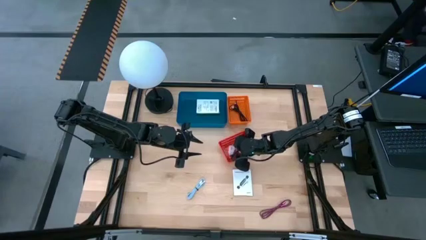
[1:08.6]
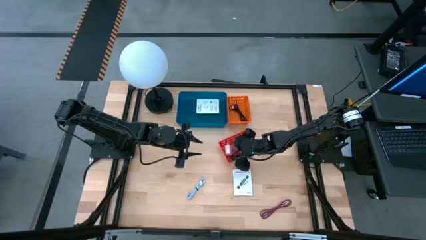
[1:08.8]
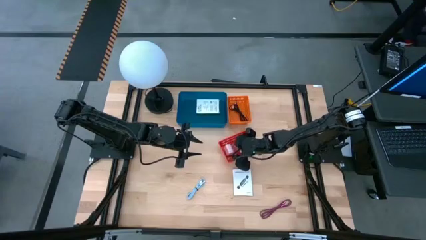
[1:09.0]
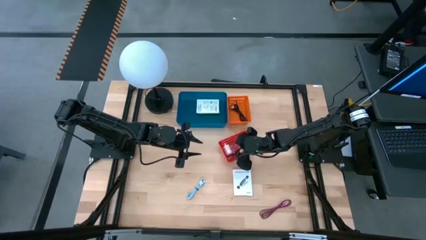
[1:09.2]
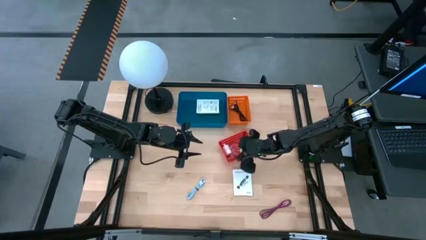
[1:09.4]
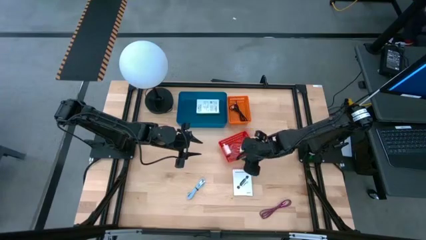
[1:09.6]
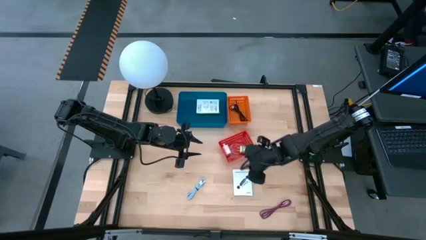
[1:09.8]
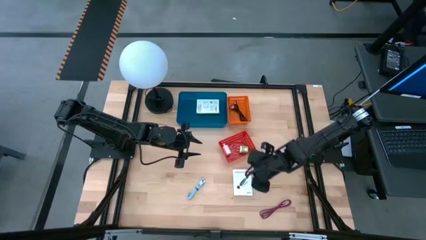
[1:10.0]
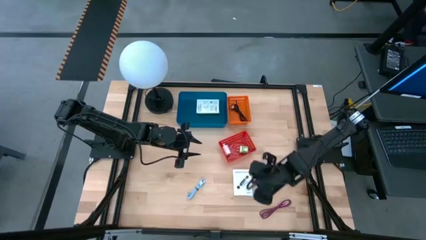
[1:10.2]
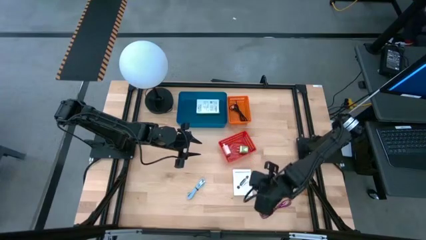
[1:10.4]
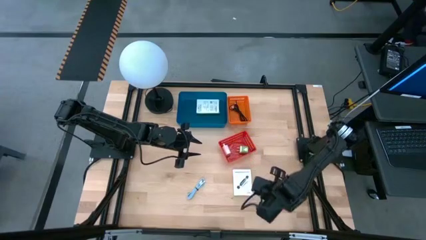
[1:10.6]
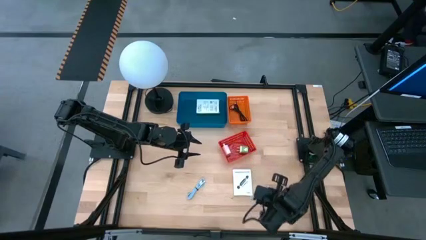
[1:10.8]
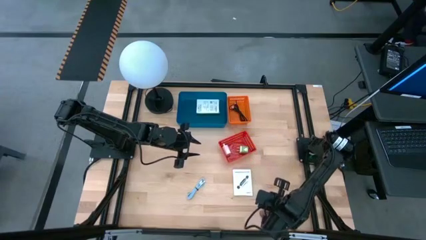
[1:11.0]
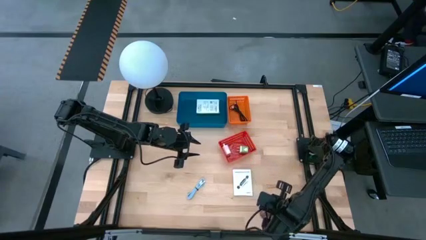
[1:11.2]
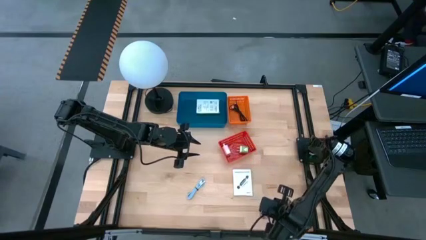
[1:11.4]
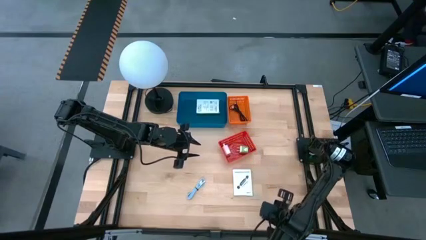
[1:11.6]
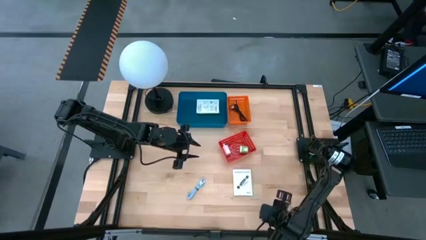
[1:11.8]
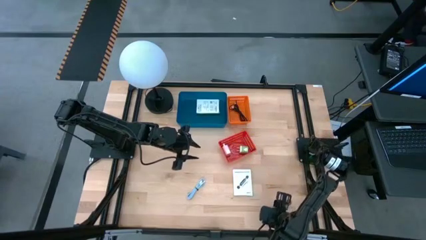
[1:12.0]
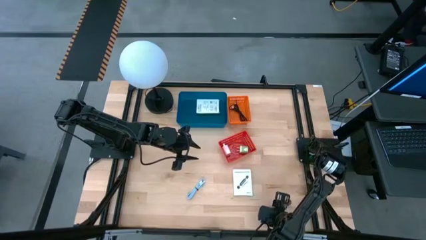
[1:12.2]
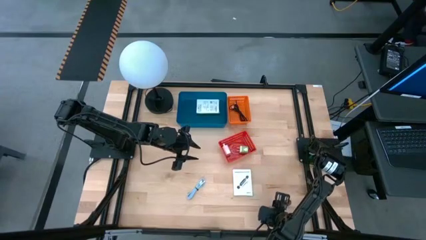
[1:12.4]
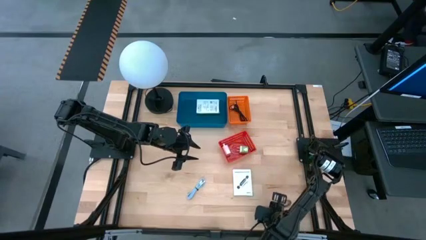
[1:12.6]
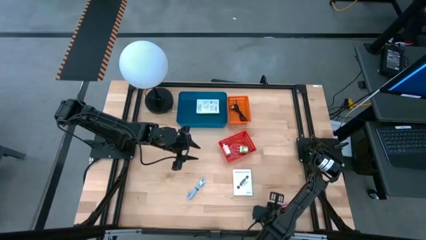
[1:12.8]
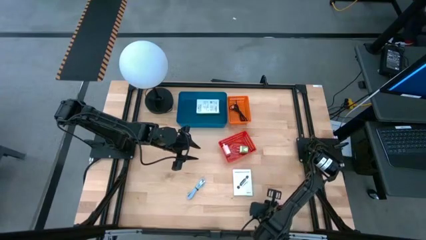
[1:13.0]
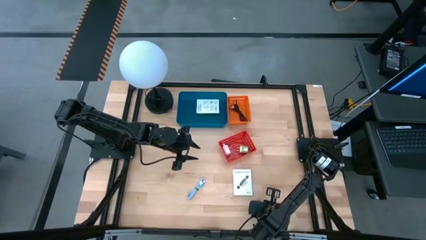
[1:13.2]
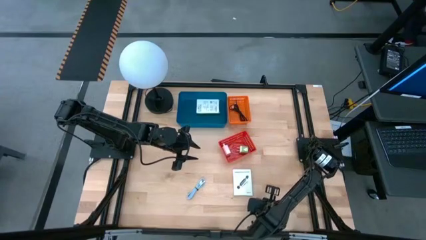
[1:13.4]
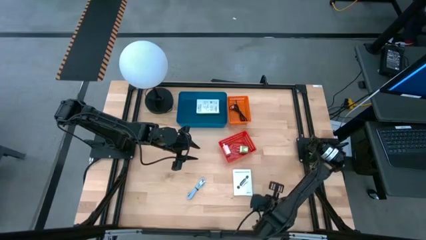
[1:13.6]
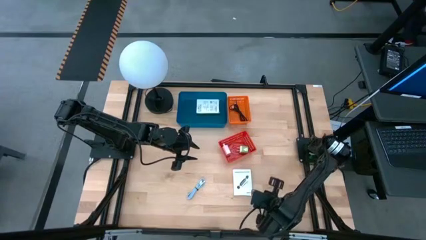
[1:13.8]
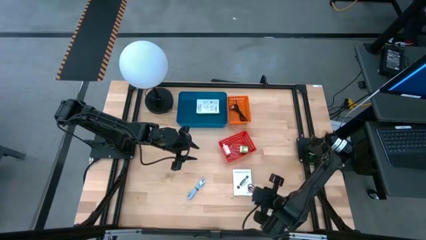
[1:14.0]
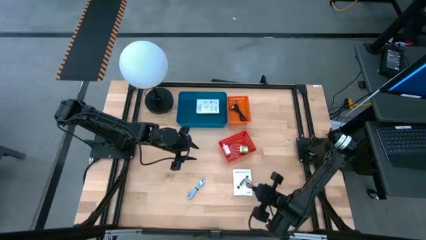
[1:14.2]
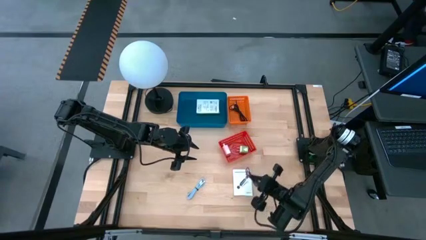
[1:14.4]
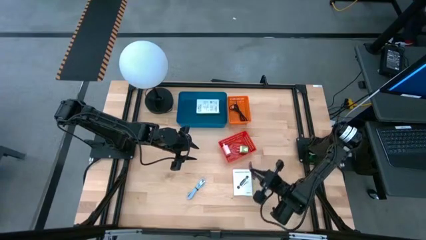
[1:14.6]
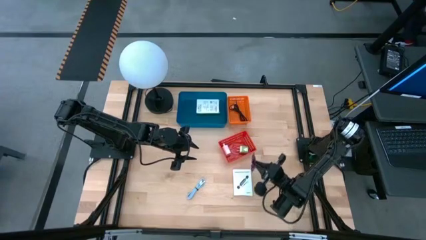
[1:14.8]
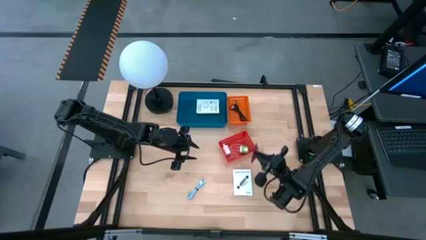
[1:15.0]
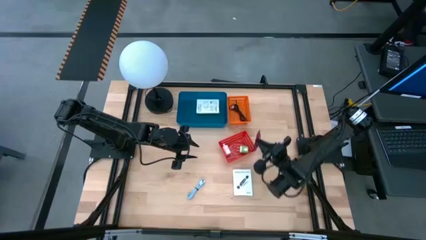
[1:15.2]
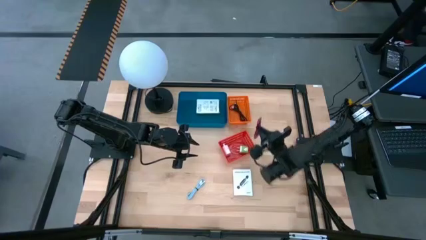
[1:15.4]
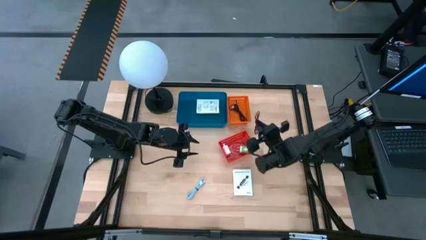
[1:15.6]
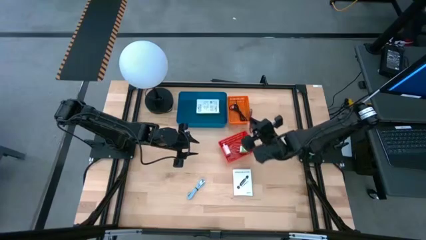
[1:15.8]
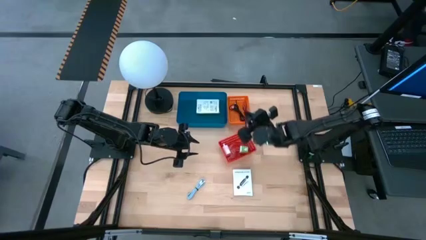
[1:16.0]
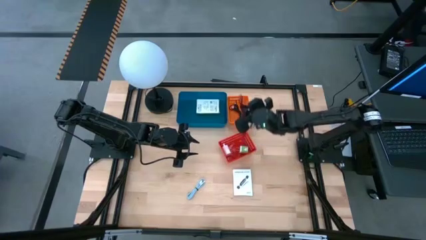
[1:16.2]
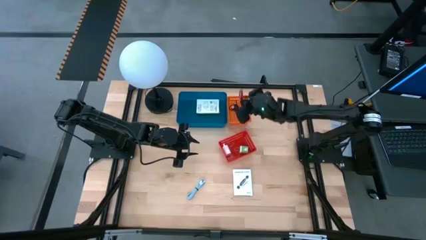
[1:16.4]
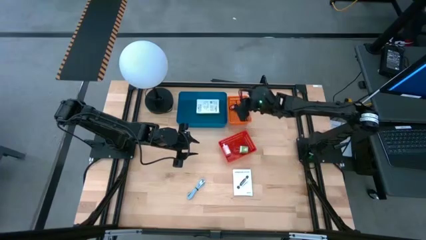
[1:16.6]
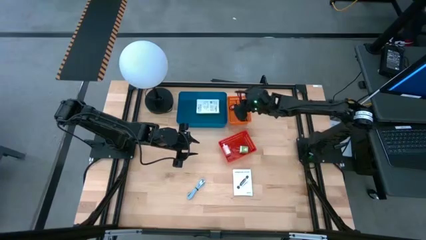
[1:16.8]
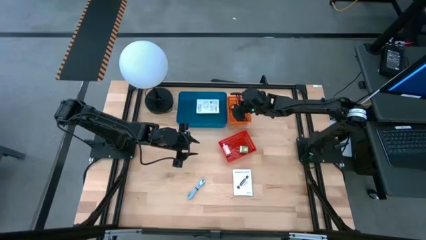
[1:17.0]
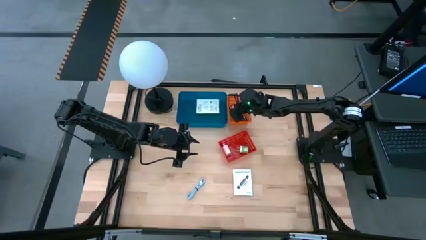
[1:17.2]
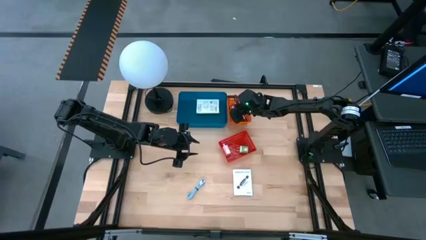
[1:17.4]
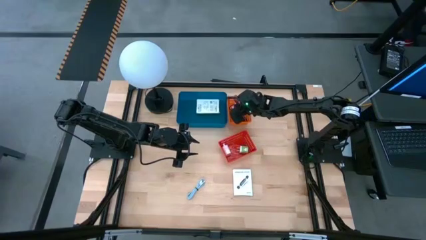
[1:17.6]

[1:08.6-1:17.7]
Task: Pick and place items into bin
Put the pink charger cable into the orange bin

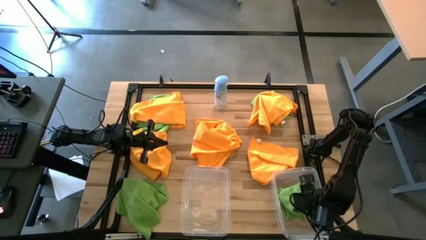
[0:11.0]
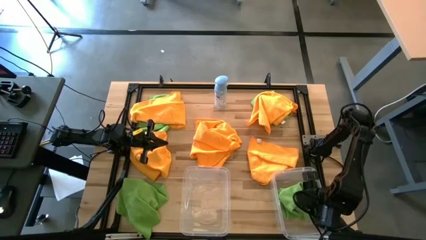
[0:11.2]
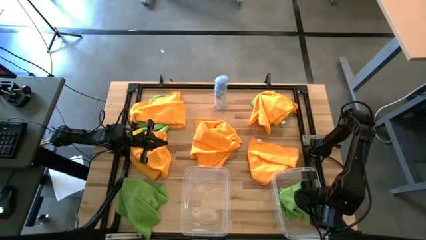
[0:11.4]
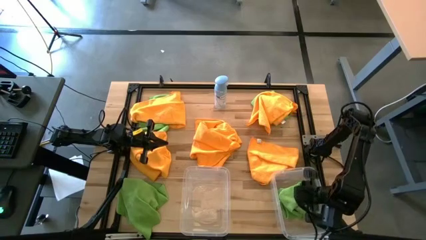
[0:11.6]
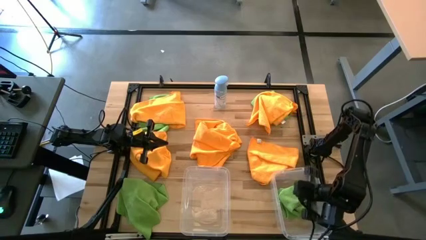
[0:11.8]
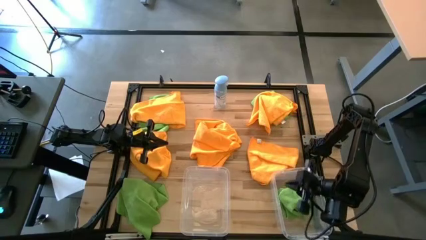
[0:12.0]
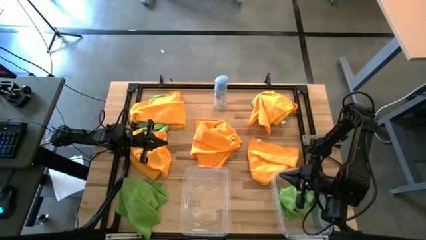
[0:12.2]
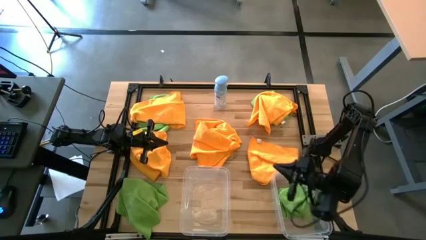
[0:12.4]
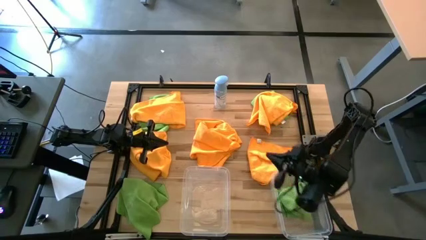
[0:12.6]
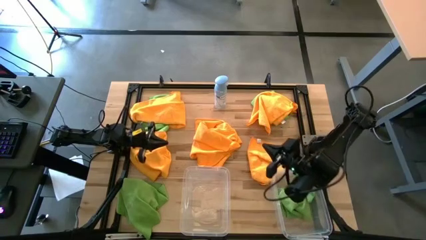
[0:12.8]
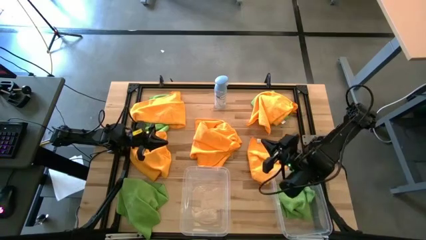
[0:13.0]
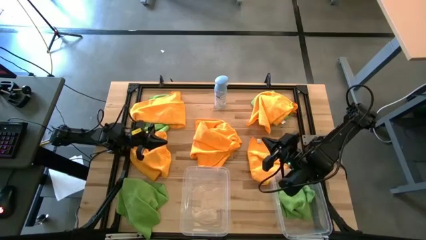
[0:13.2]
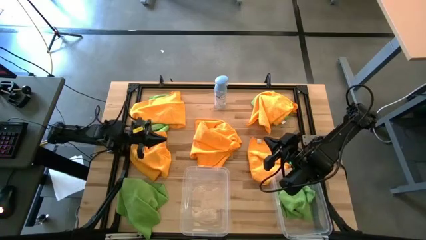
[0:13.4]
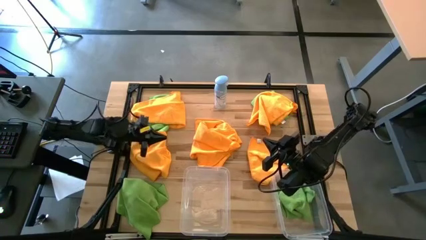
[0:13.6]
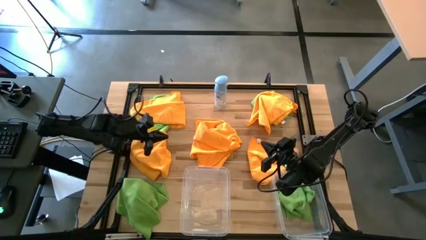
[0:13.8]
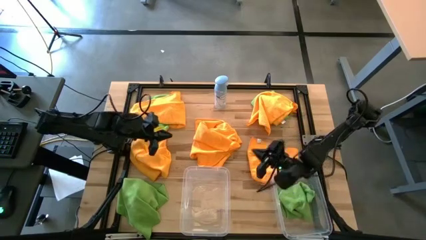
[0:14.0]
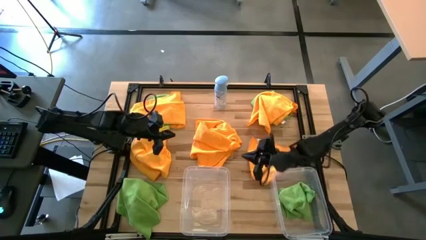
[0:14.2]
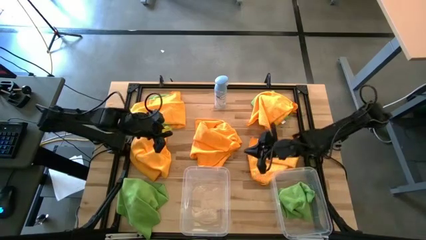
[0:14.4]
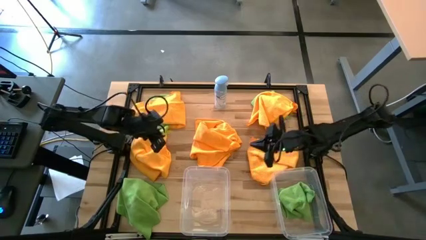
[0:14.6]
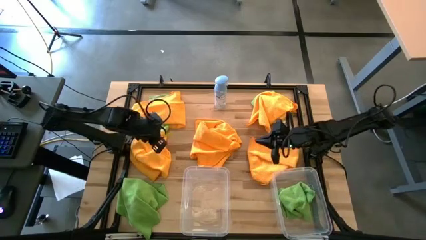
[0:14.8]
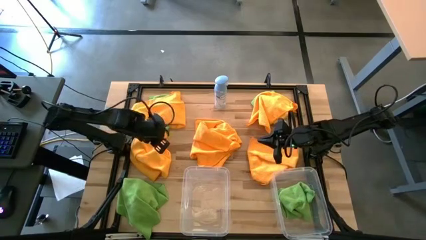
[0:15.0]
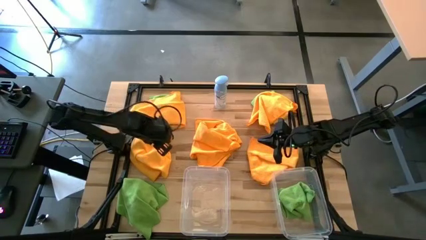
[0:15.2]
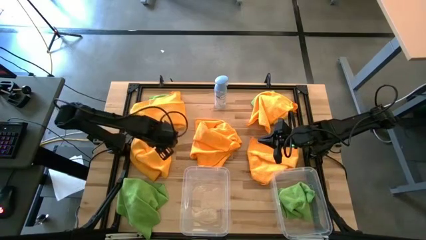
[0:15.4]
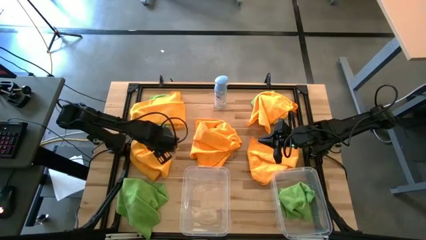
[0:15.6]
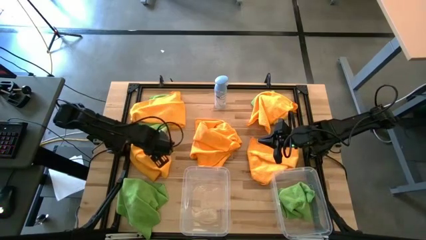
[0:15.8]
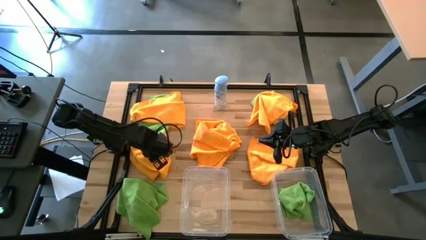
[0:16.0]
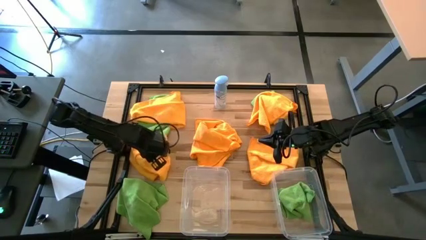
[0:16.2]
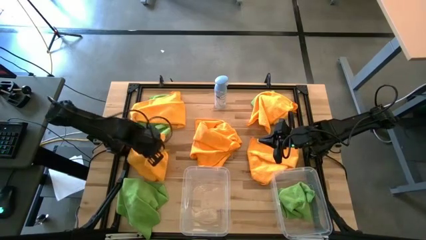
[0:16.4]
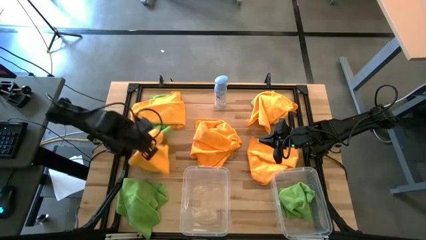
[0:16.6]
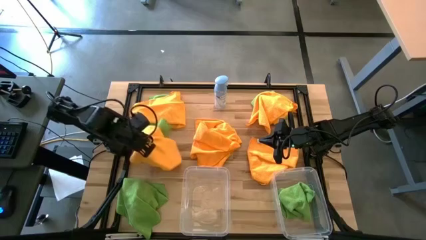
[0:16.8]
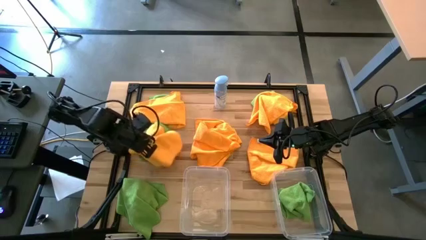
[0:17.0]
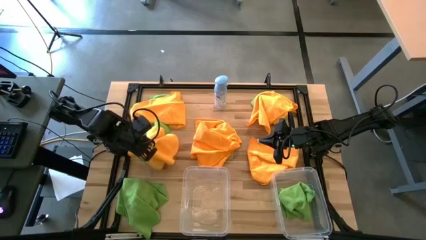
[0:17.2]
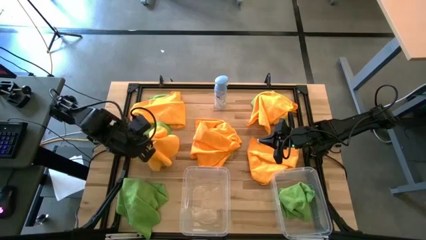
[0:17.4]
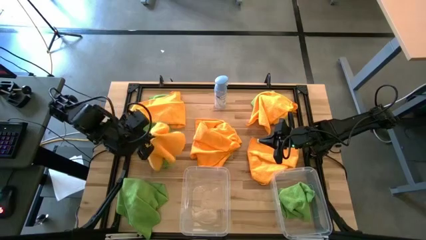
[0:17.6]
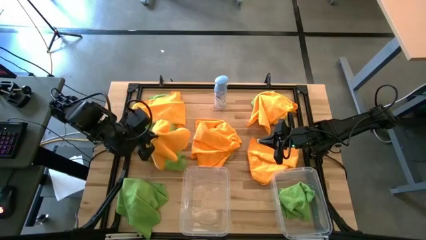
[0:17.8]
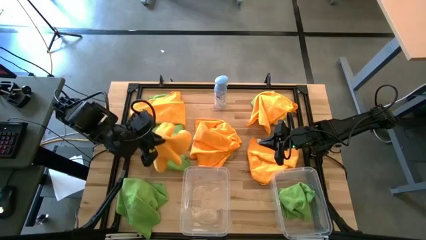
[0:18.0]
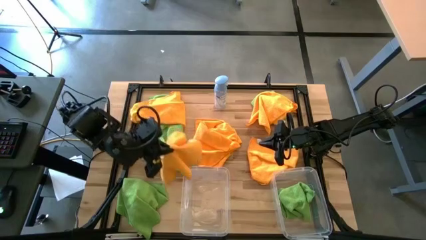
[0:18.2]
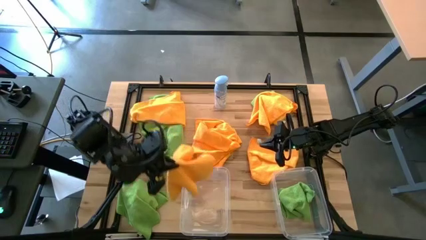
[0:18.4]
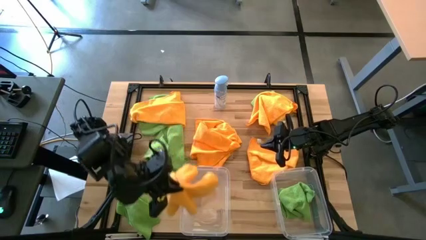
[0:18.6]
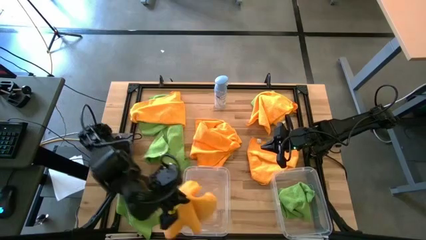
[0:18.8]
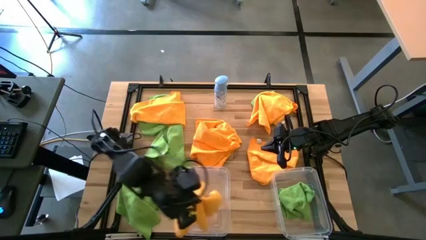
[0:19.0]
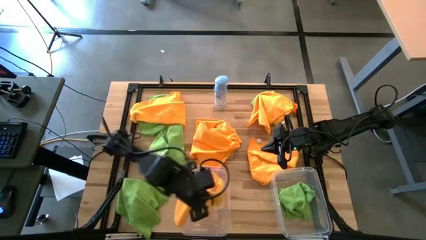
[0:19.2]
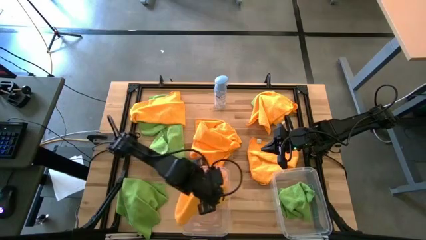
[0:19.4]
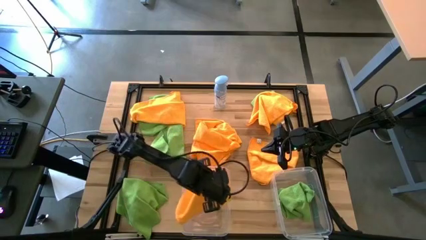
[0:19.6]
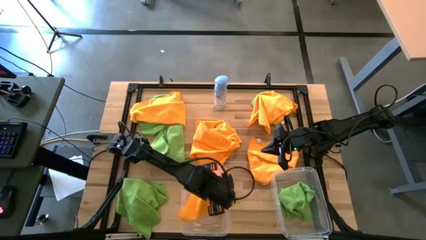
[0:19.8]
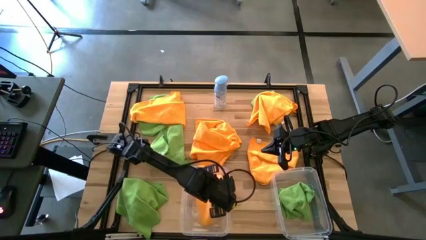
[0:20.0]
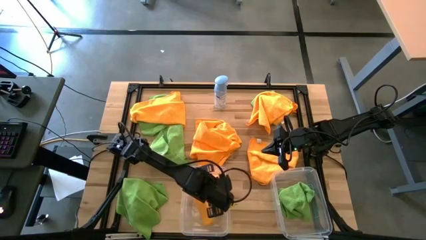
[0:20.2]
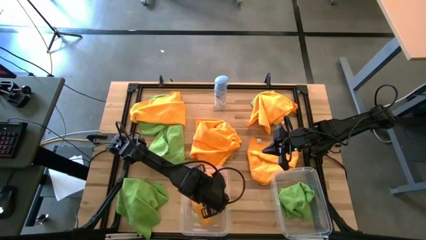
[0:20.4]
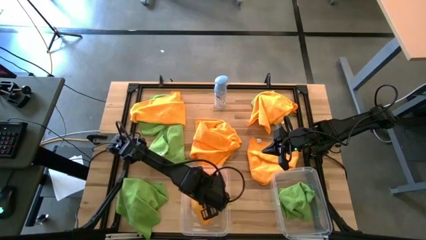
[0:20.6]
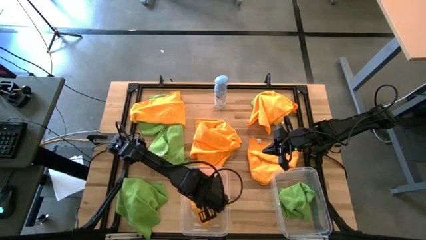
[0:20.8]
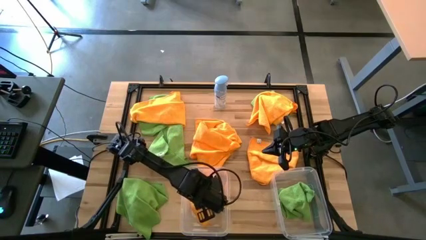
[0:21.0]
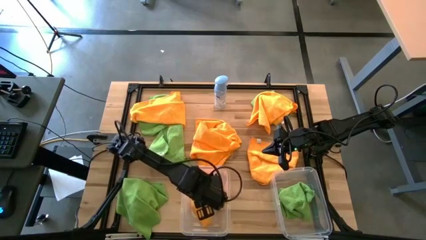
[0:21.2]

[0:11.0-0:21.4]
Task: Sort microfiber towel by color & place in baskets
Put the yellow towel into the left transparent bin
